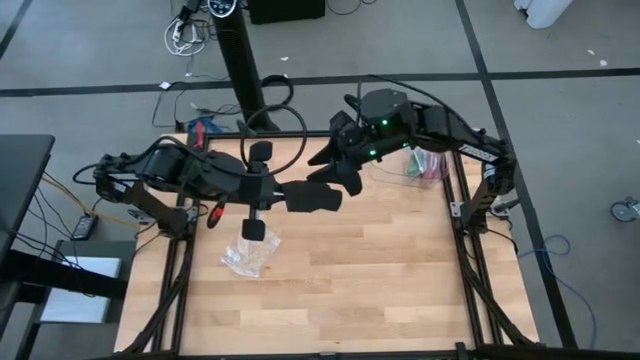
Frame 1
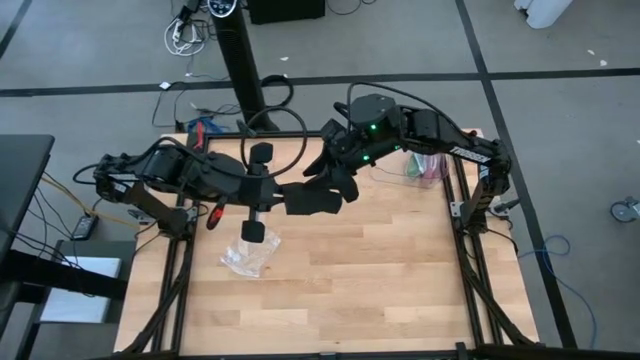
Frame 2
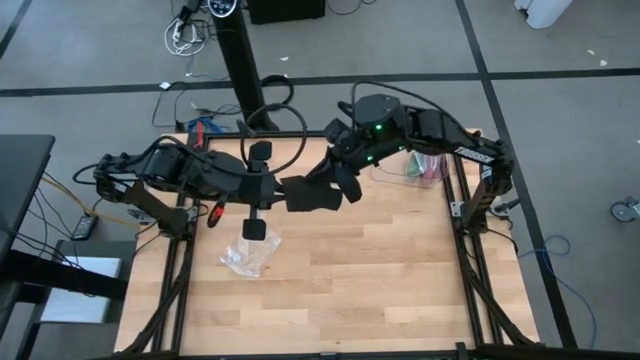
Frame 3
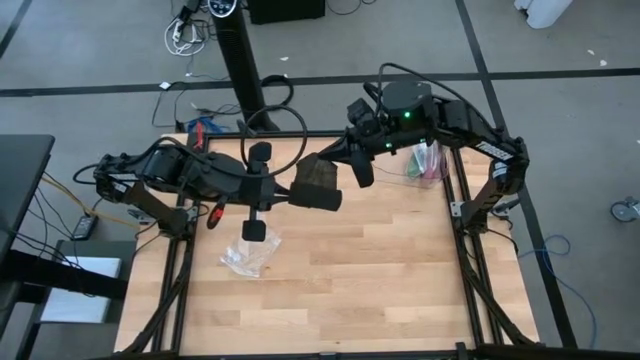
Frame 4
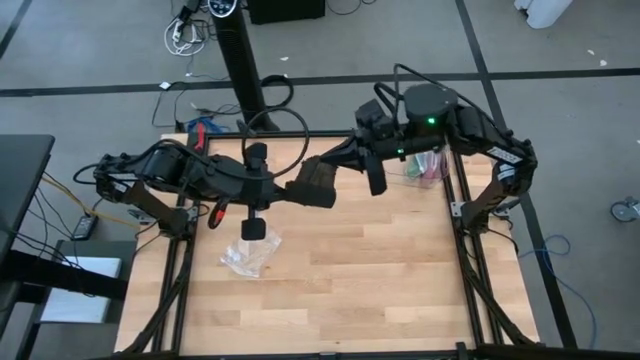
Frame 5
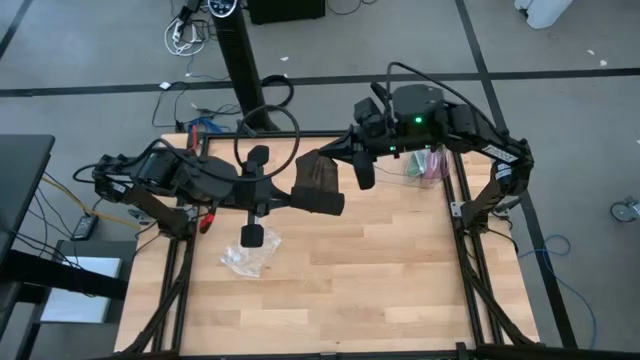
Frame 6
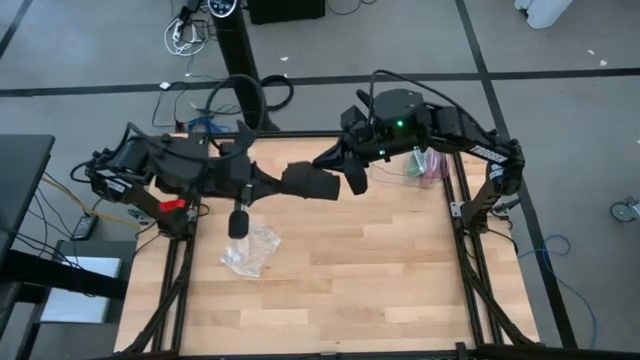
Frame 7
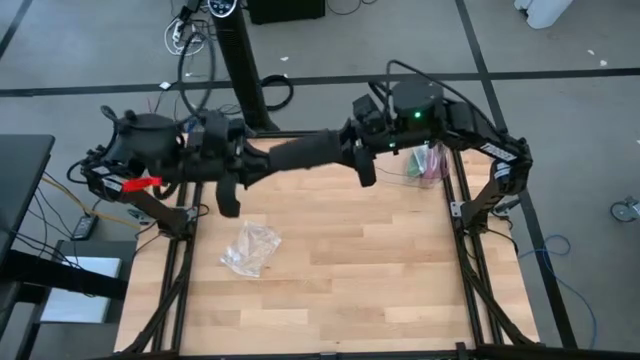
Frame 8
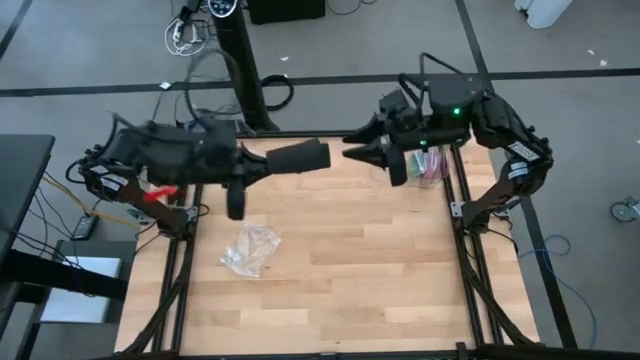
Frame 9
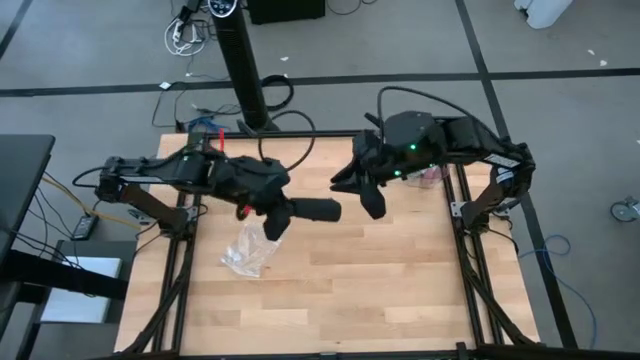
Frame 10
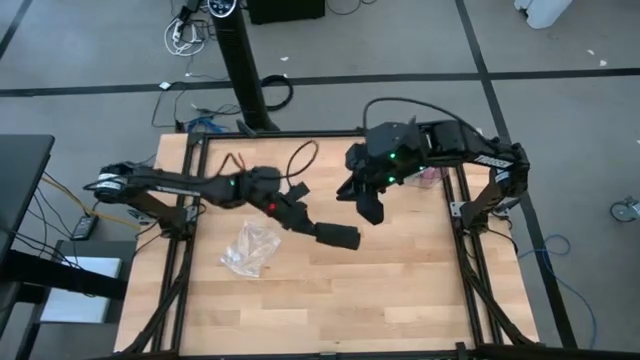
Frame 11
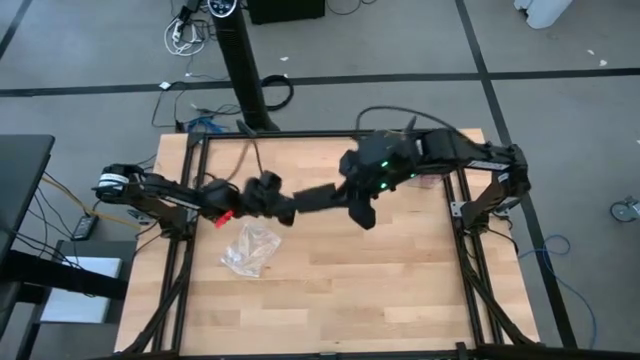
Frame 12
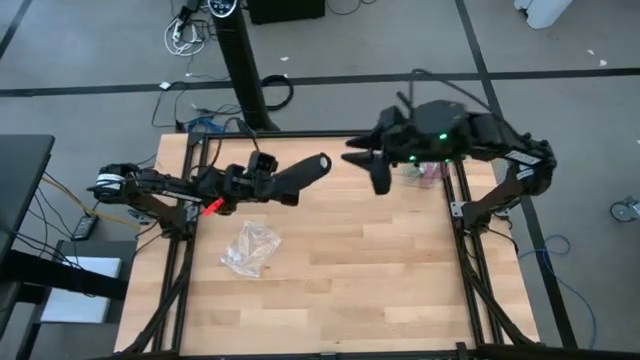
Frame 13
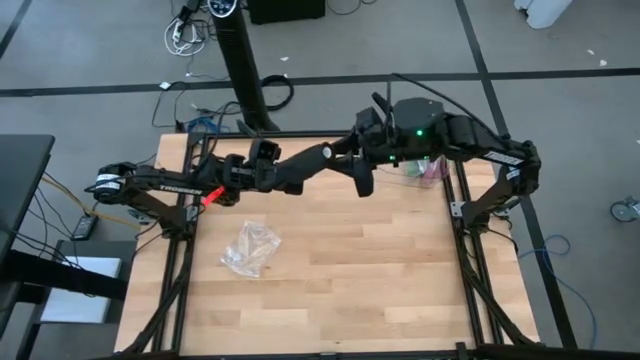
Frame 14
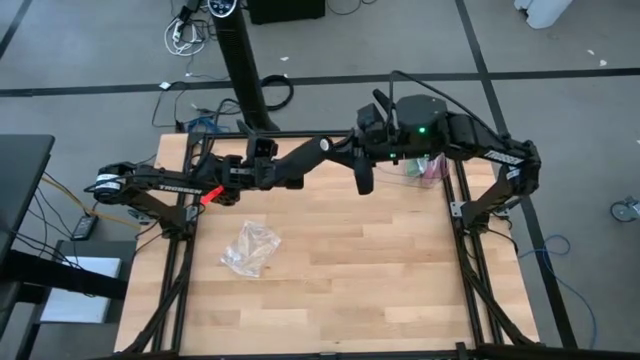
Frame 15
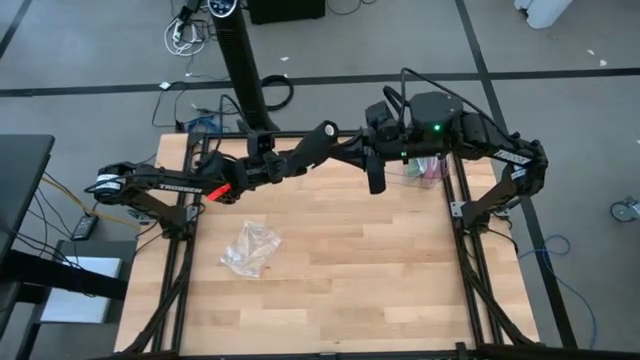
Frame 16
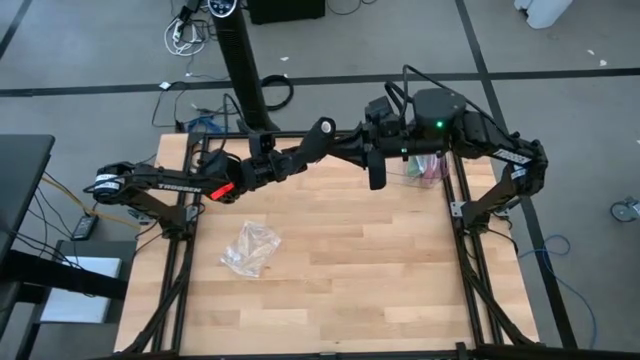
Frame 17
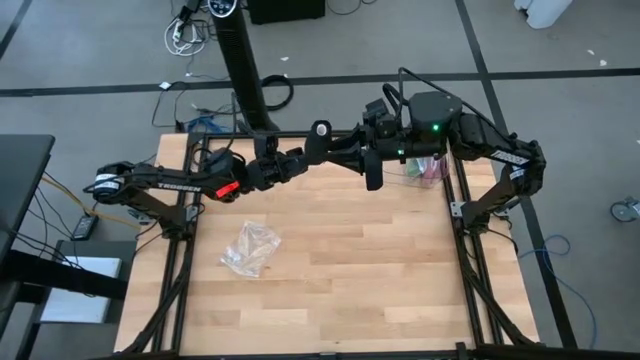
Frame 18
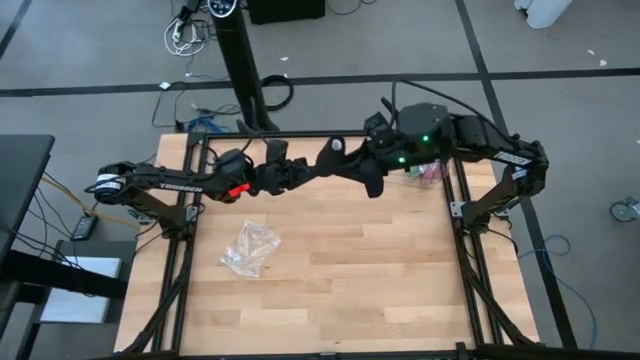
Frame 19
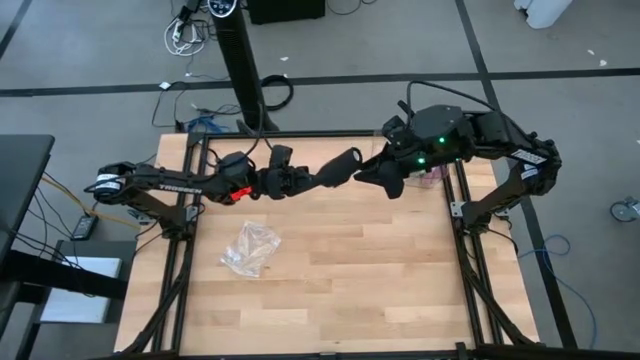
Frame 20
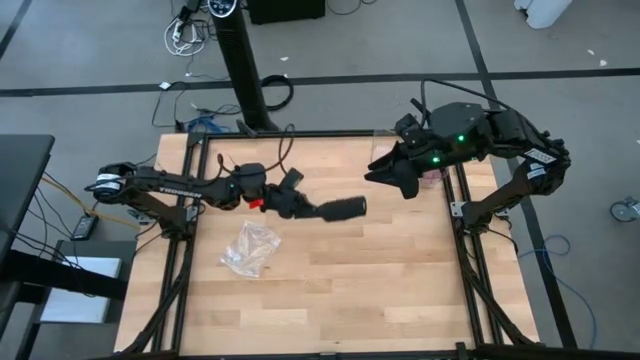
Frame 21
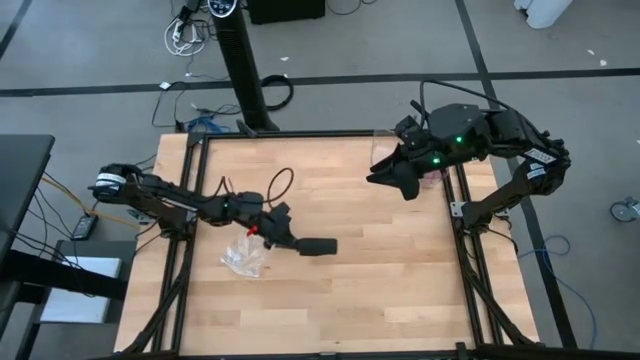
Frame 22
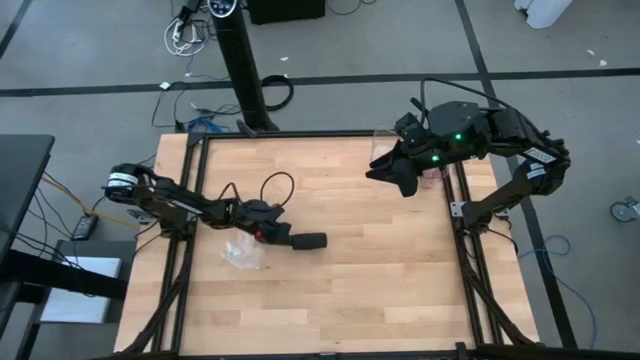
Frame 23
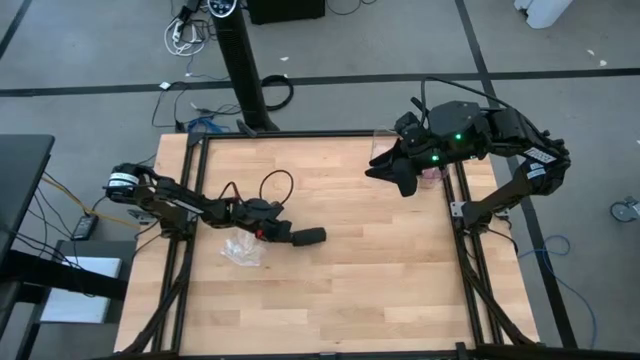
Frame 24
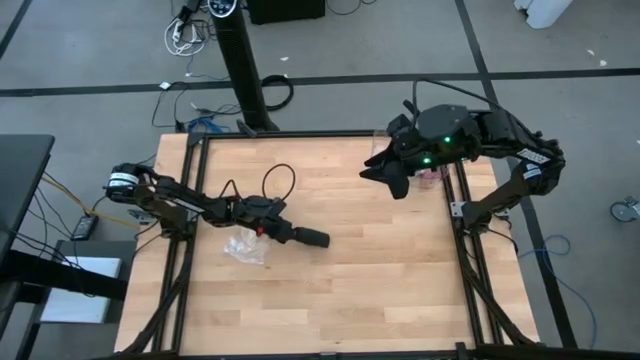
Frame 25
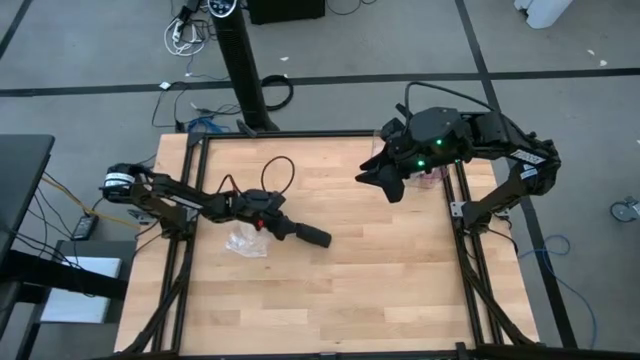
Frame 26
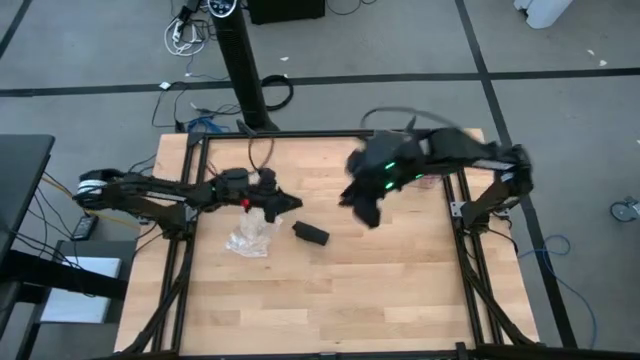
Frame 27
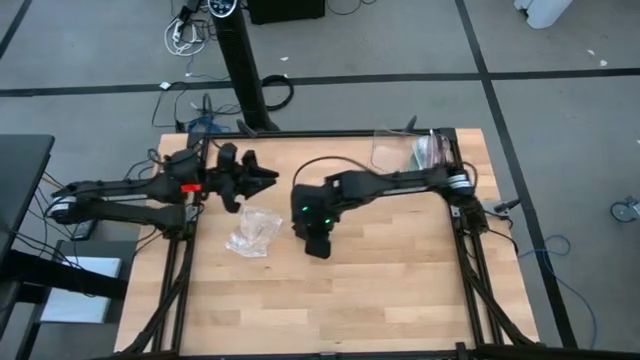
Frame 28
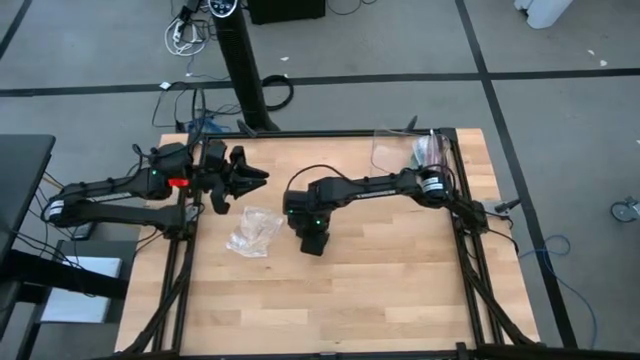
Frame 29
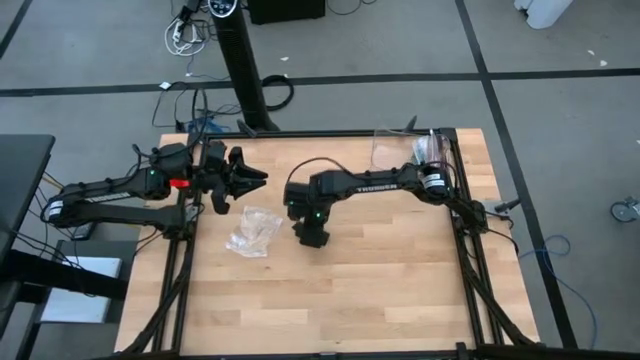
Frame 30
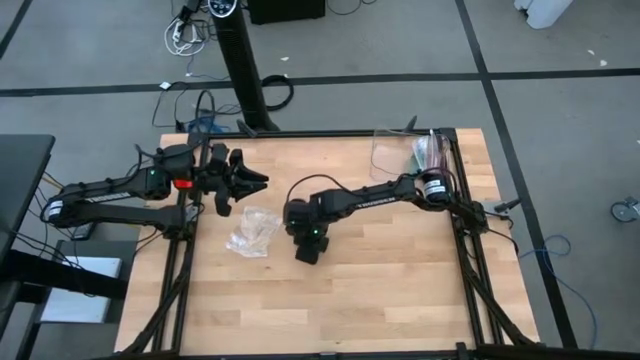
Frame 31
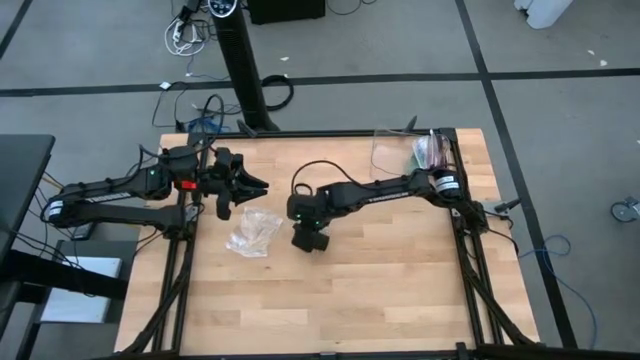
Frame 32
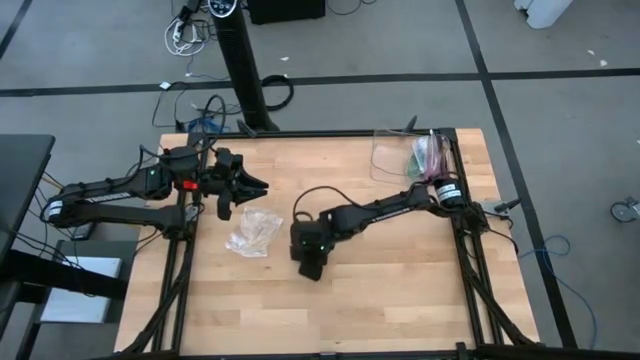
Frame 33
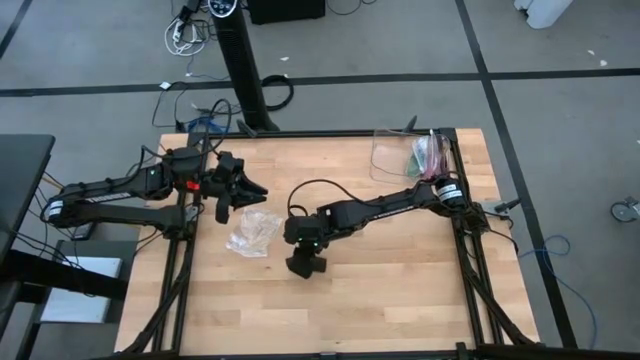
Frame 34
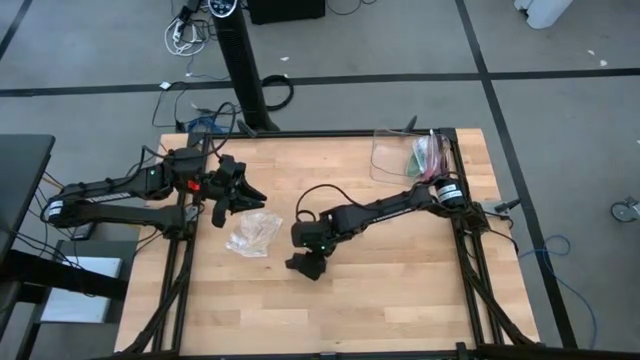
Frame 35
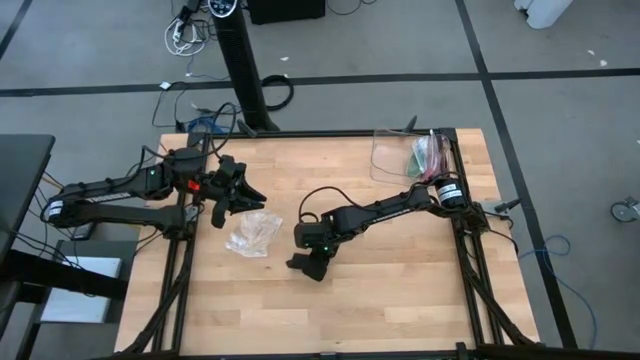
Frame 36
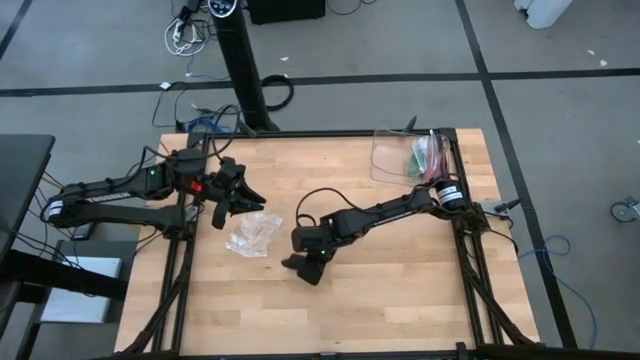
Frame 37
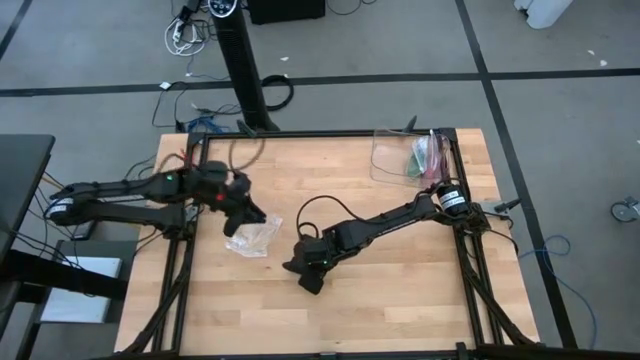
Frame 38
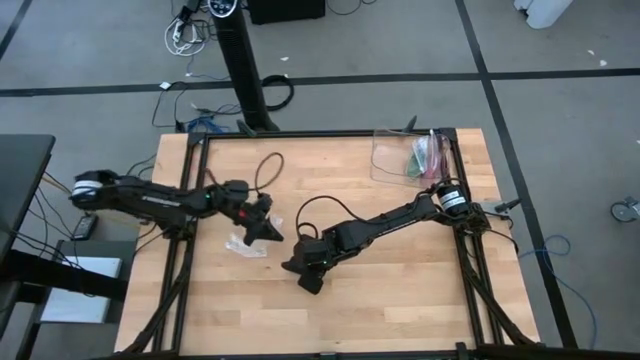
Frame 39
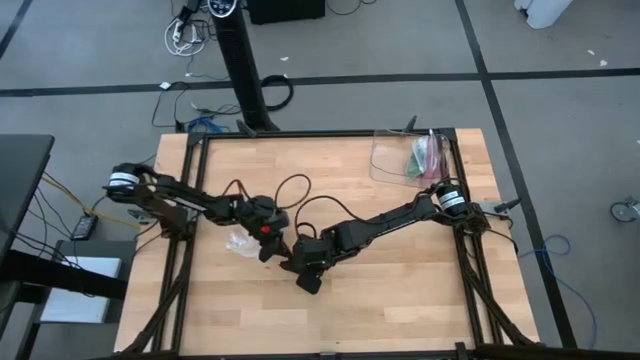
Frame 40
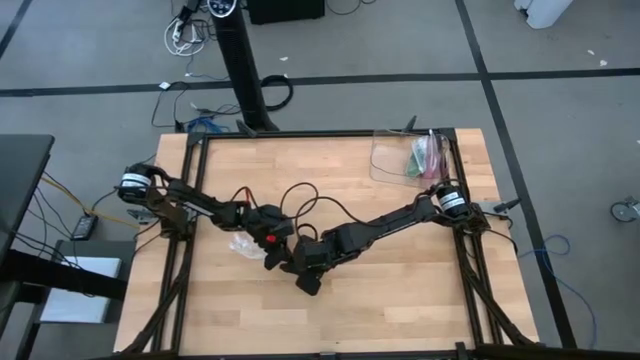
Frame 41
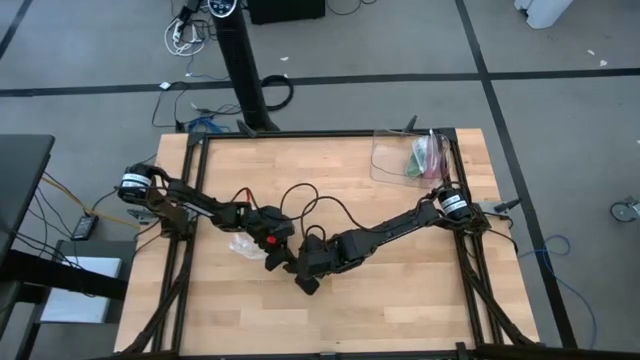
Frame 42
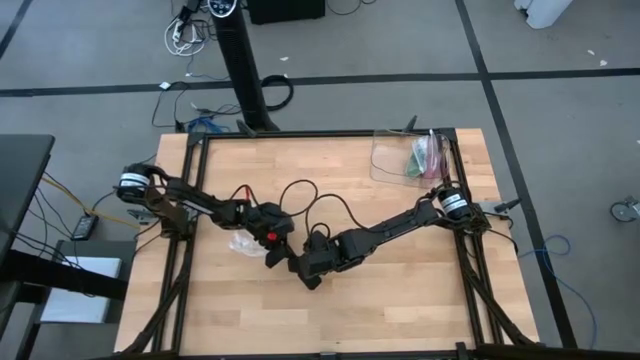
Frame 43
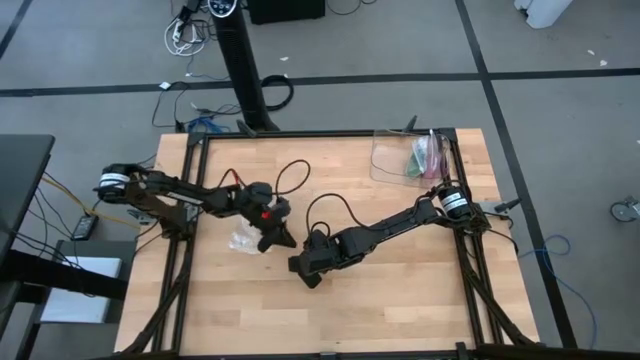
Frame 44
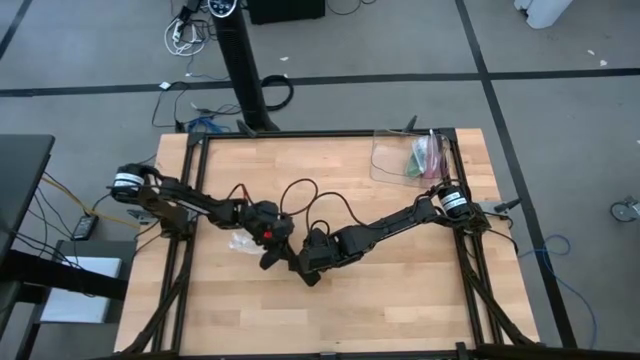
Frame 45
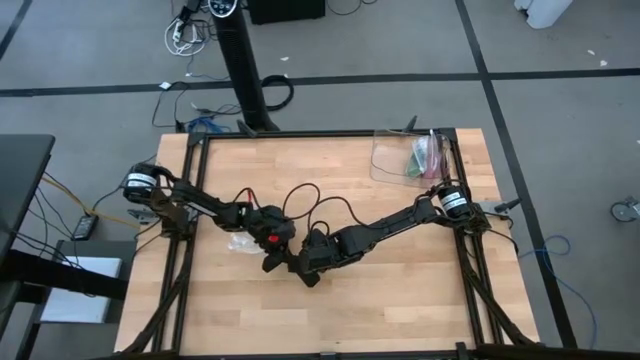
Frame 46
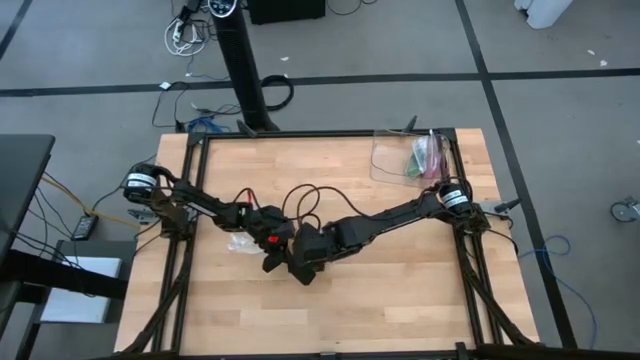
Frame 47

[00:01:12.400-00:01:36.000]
Task: Roll bandage
Roll the black bandage
